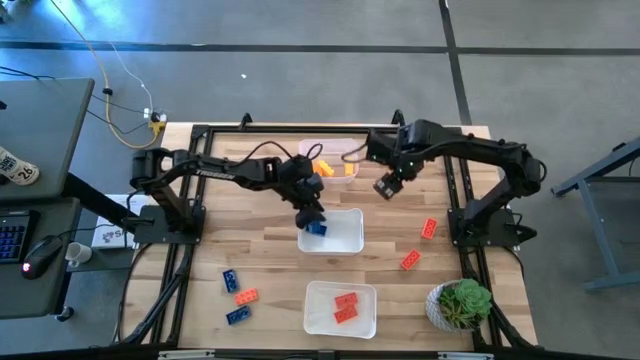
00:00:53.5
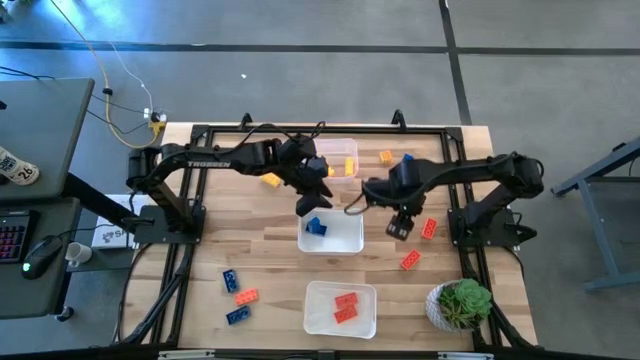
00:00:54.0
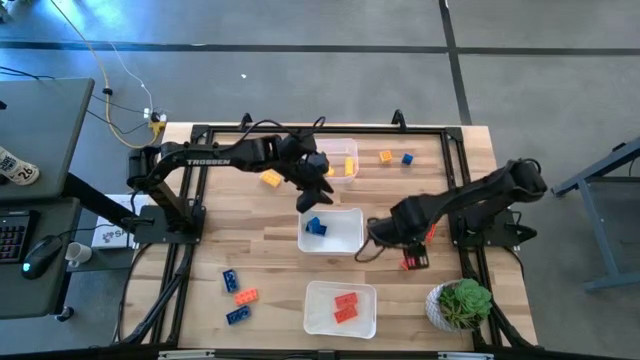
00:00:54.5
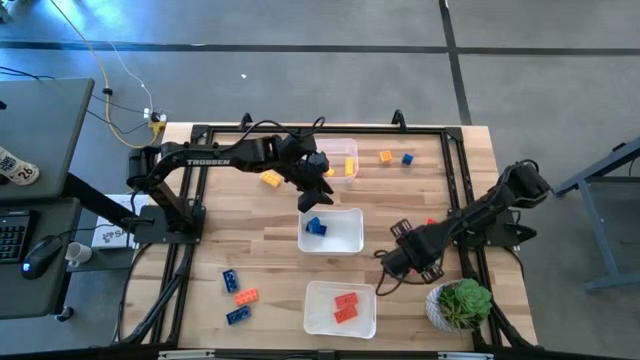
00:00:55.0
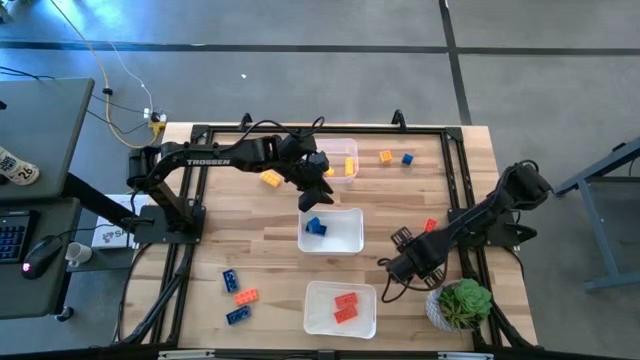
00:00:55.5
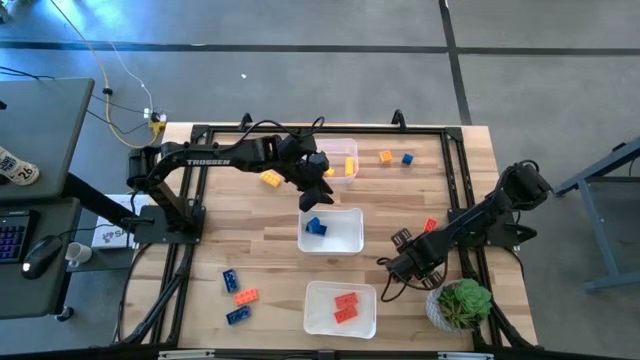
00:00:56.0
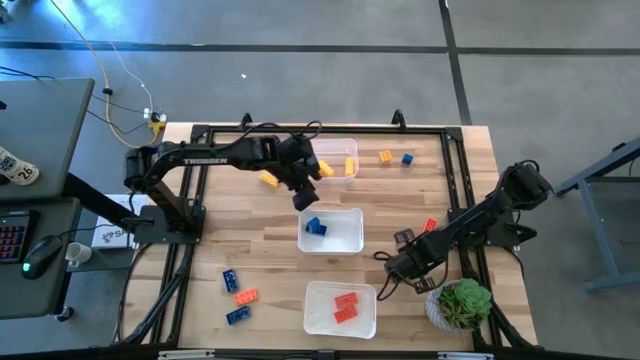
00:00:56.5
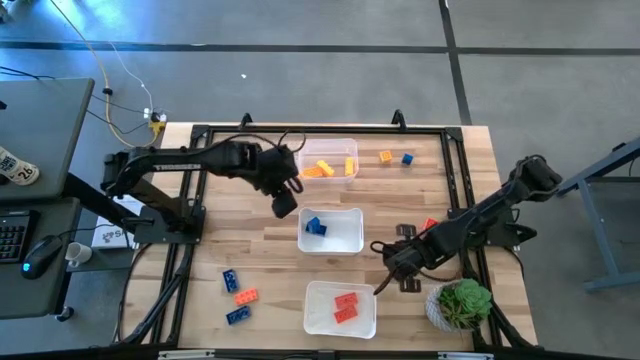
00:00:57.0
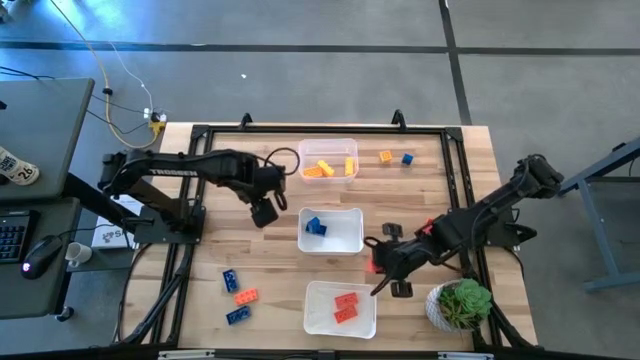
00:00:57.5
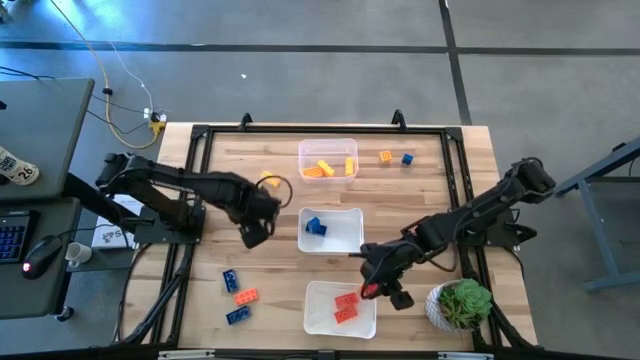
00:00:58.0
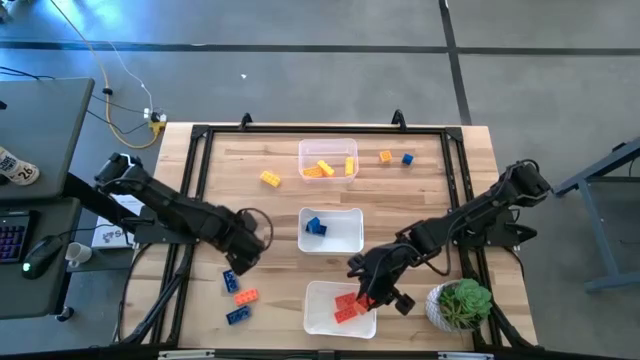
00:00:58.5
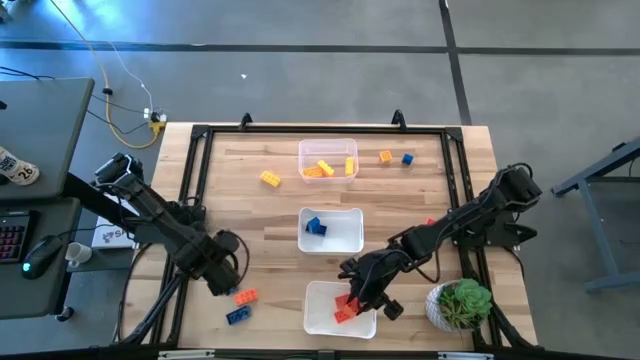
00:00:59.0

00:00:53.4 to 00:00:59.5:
Task: Sort & place blocks by color
Put the orange game piece into the bottom white bin

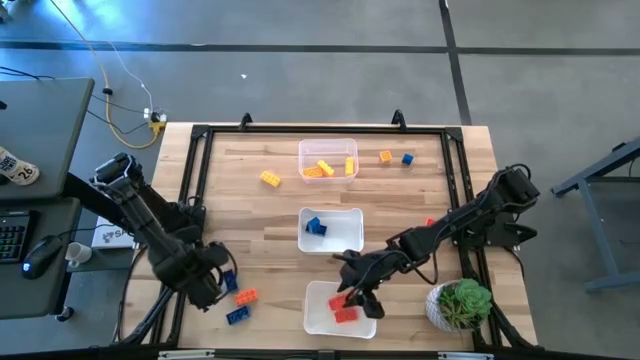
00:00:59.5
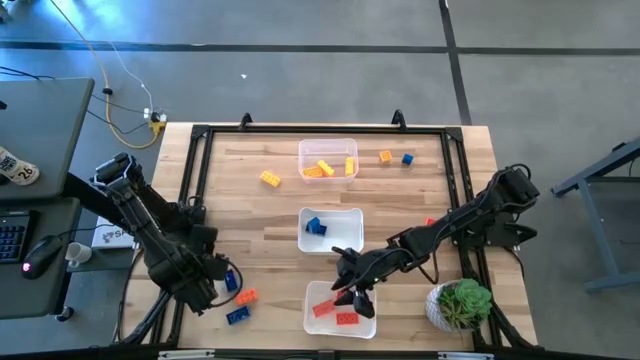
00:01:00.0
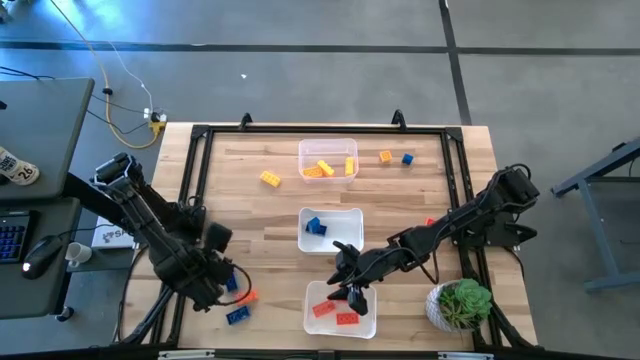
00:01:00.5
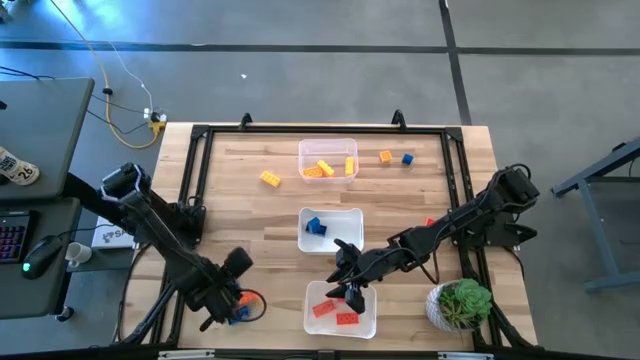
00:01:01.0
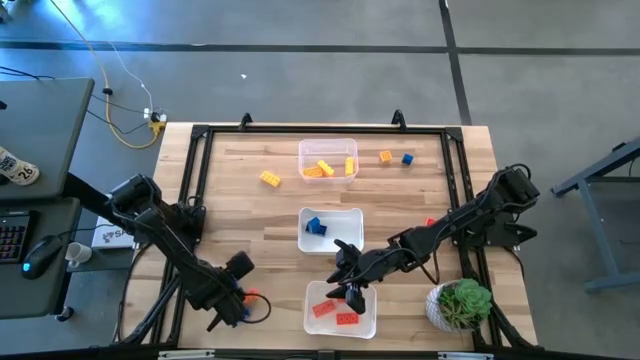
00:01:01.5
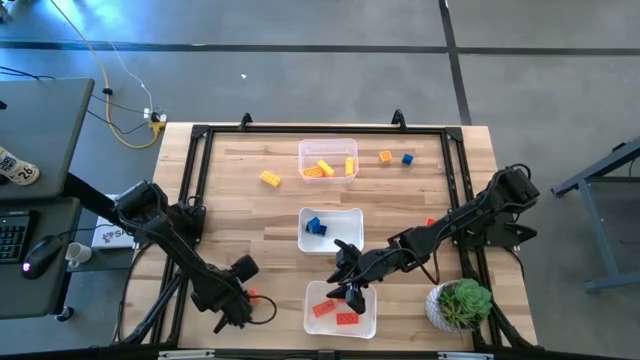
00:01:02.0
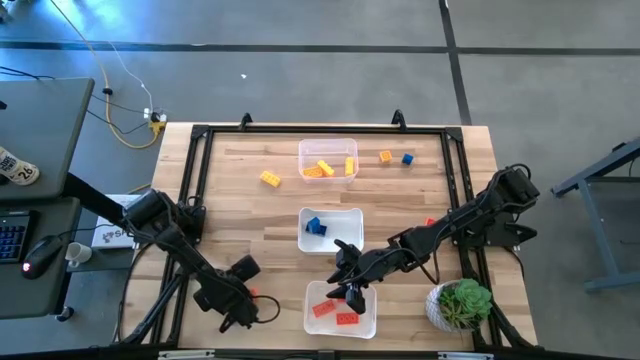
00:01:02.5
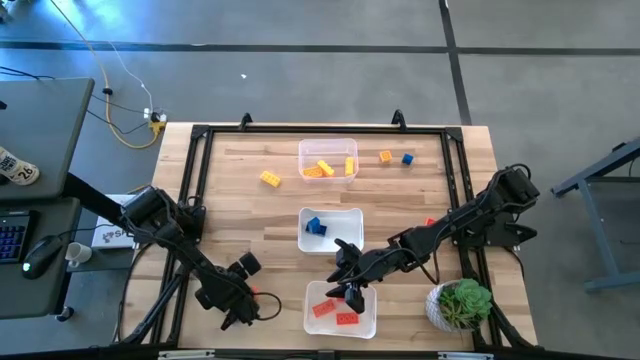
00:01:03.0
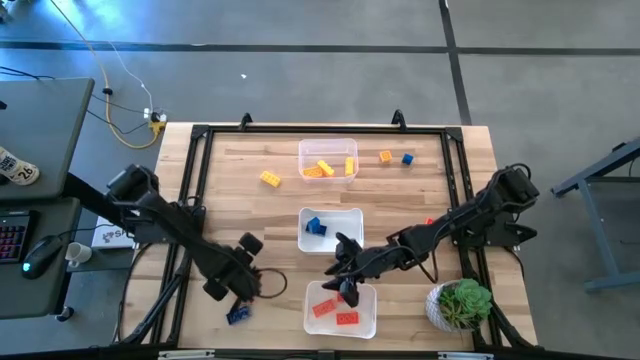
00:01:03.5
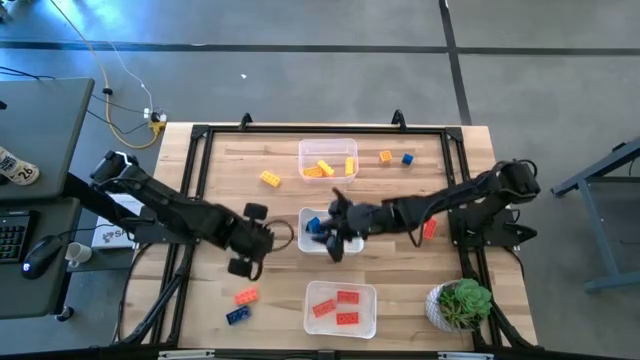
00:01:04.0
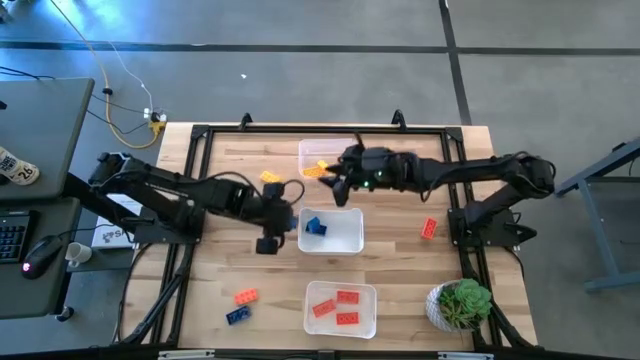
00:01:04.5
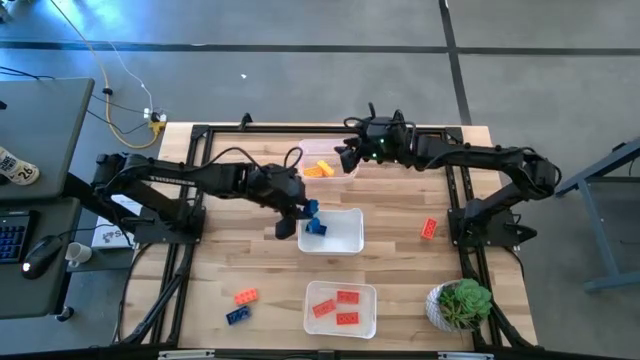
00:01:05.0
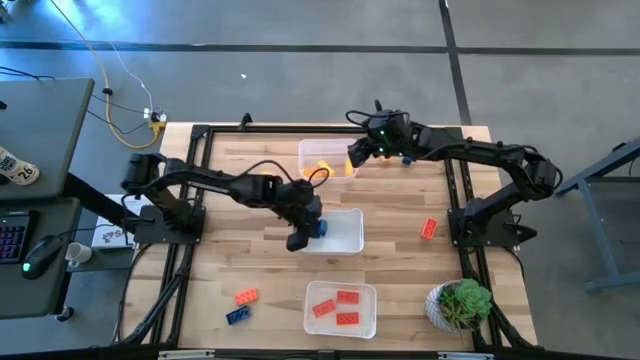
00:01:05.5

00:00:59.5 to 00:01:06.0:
Put the blue game piece into the top white bin

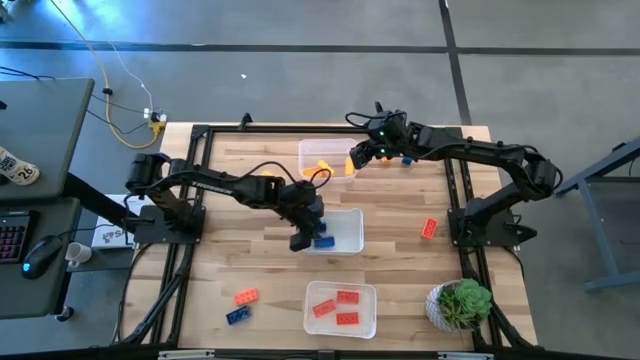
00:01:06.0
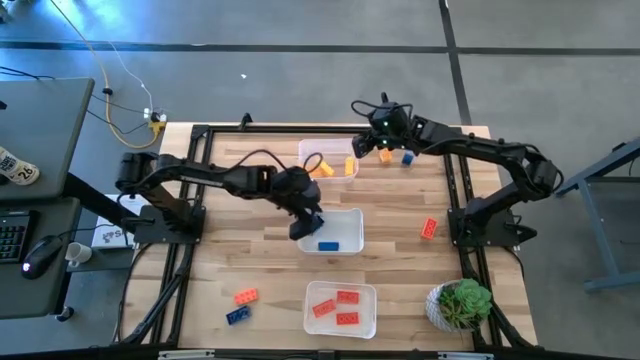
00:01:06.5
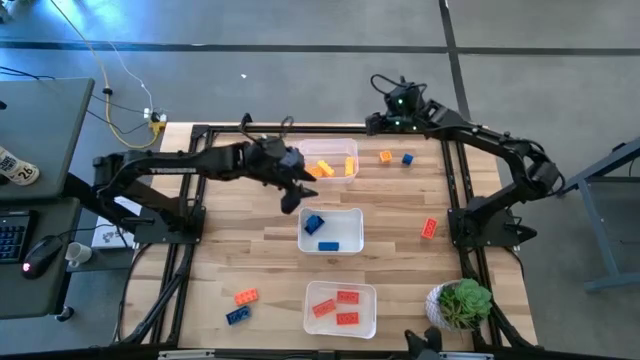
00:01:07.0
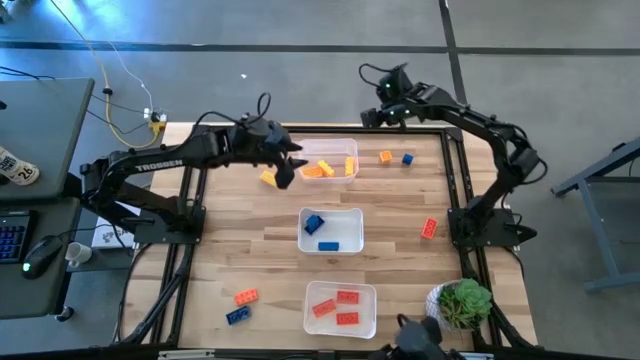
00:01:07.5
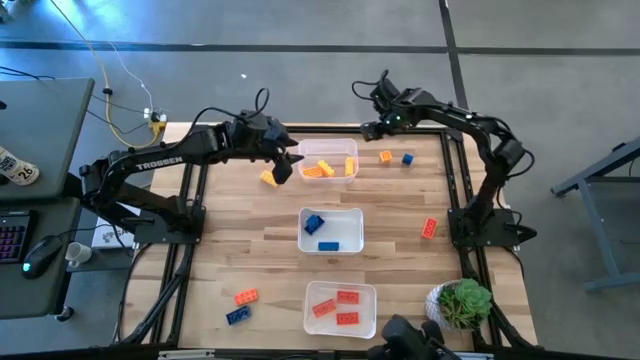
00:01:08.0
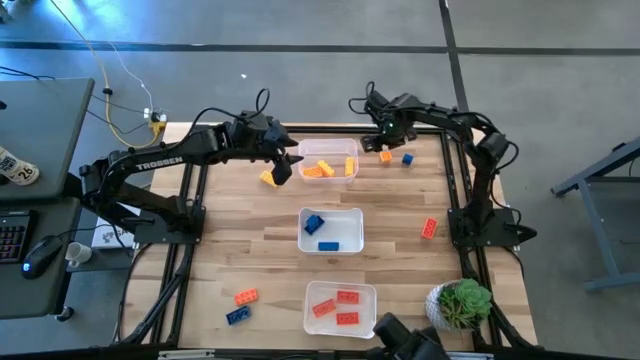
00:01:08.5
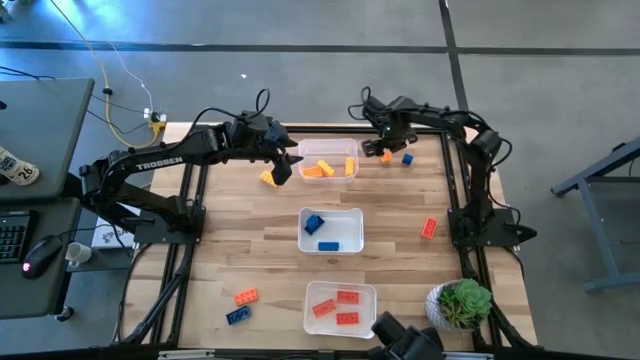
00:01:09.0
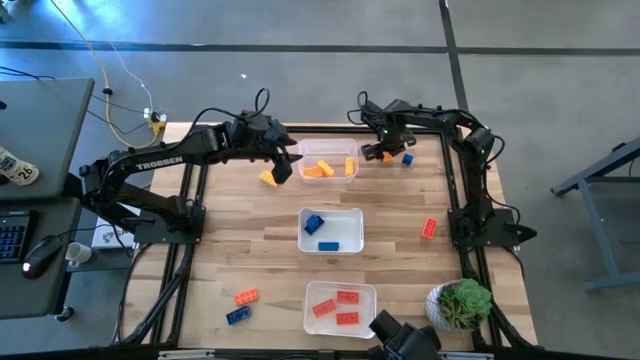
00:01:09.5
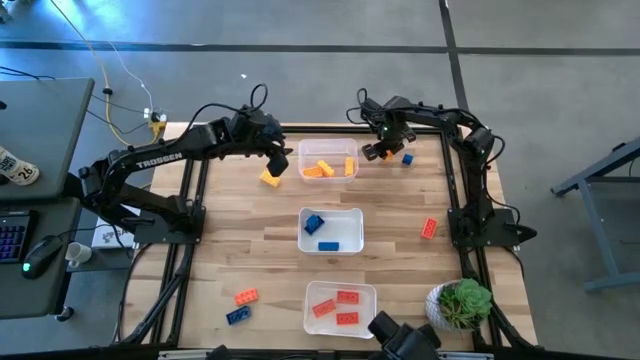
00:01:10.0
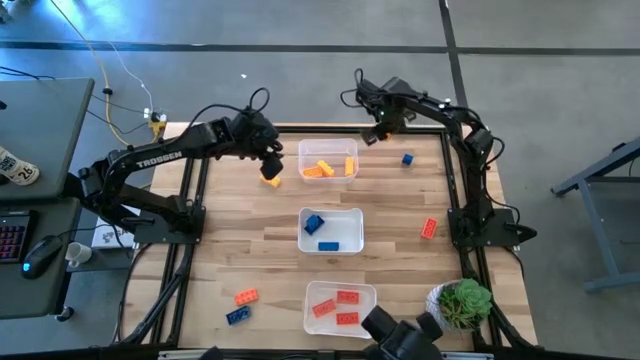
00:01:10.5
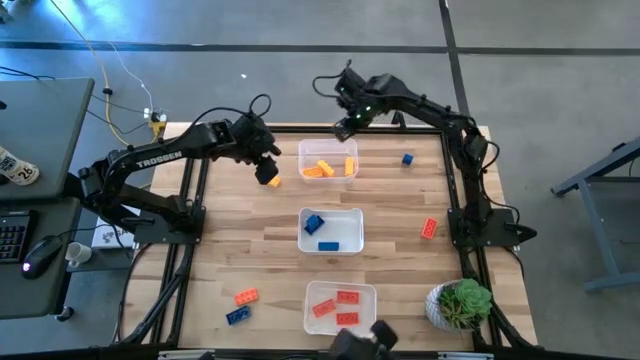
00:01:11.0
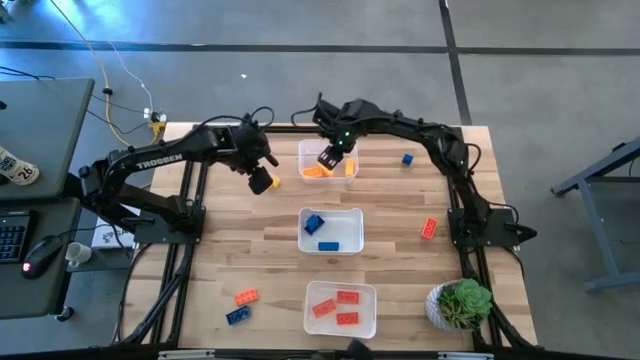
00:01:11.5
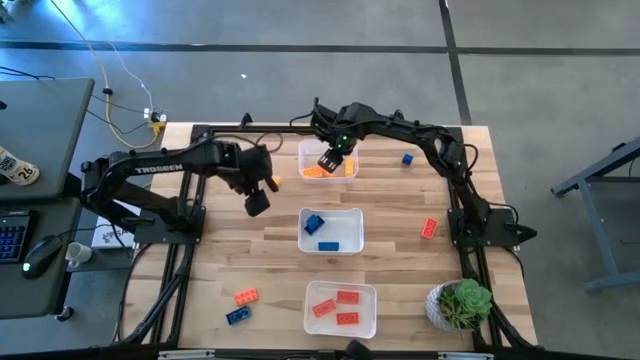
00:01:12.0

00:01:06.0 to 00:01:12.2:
Put the yellow game piece into the transparent bin

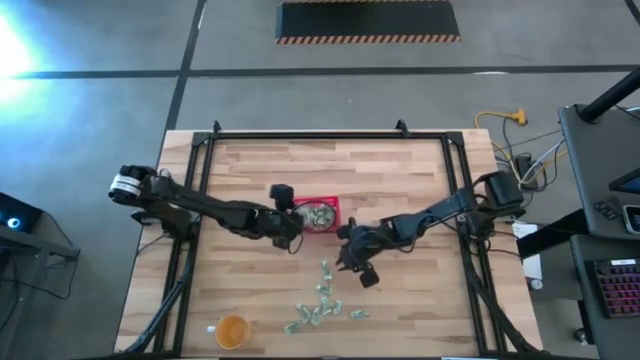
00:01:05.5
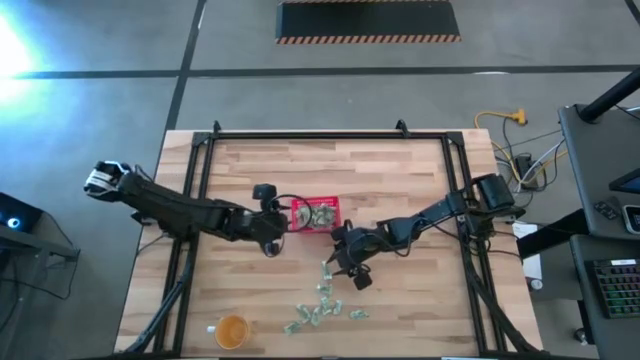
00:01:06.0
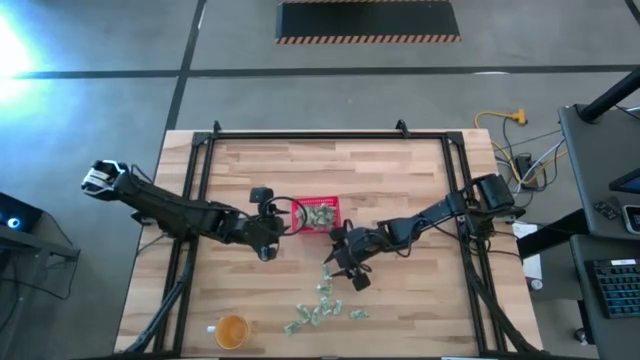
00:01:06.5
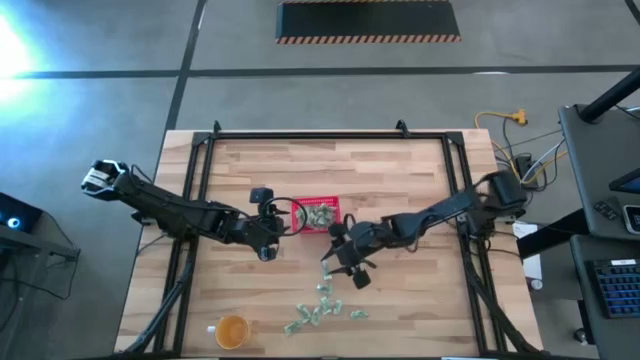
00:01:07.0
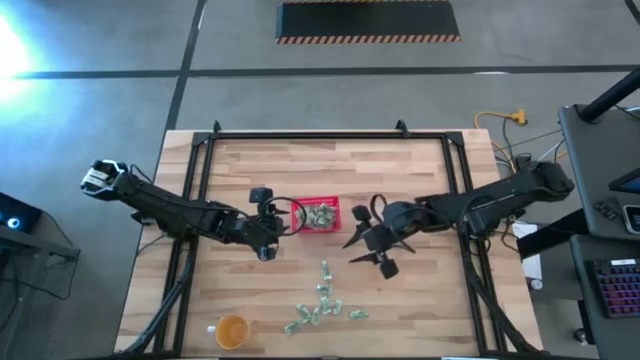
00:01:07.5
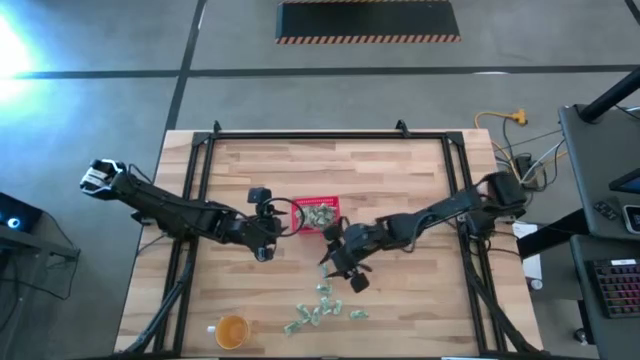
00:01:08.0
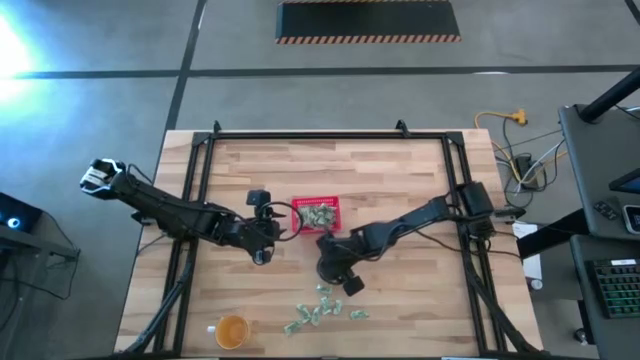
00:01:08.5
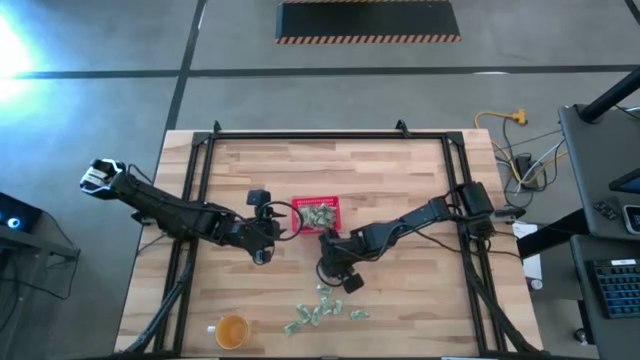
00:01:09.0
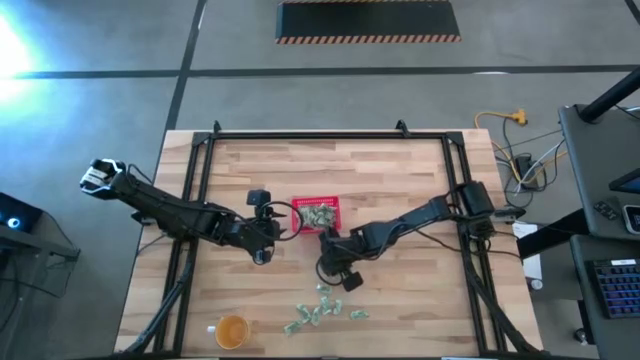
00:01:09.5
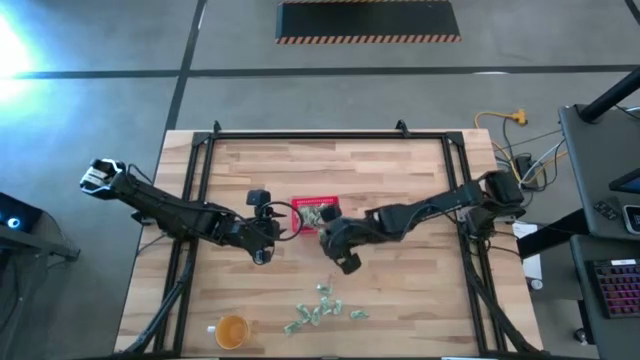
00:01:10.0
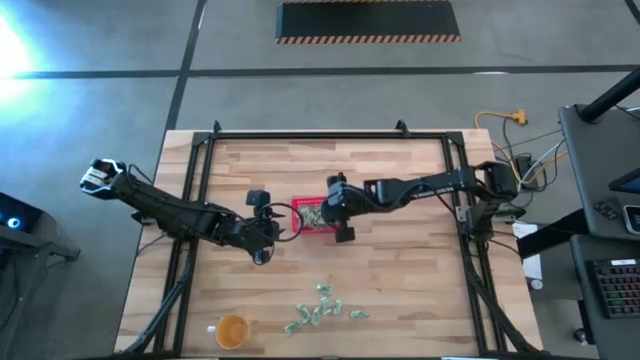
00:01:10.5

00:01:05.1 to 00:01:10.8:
Task: Pick and place items into bin
Put the stevia packet into the red bin
